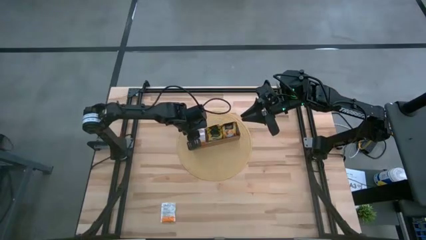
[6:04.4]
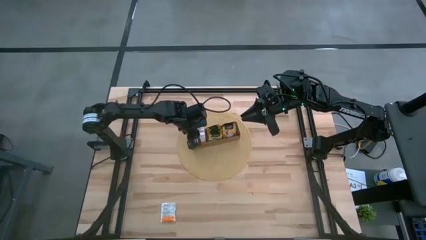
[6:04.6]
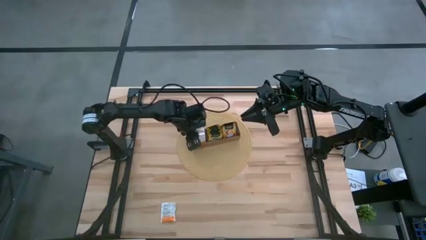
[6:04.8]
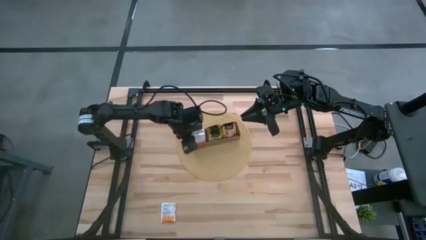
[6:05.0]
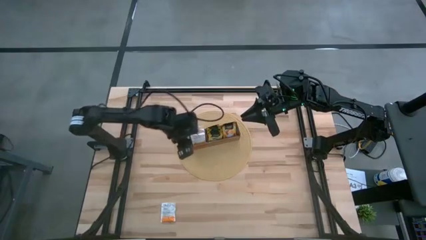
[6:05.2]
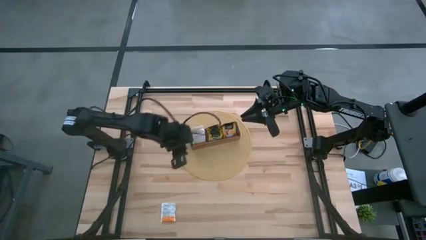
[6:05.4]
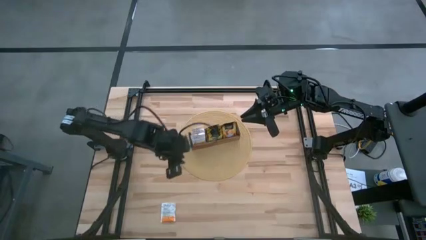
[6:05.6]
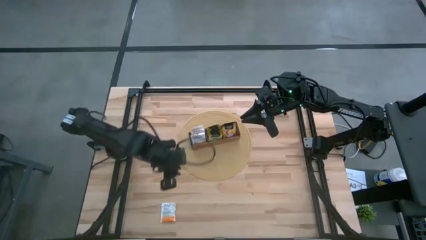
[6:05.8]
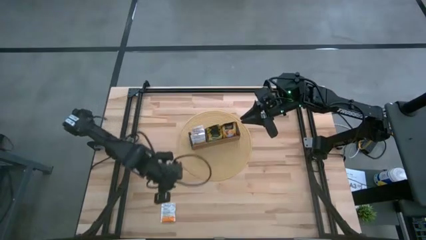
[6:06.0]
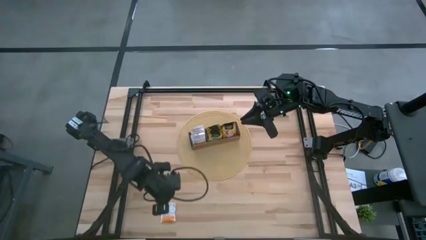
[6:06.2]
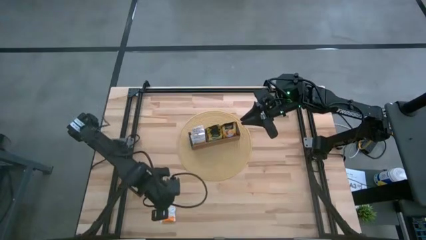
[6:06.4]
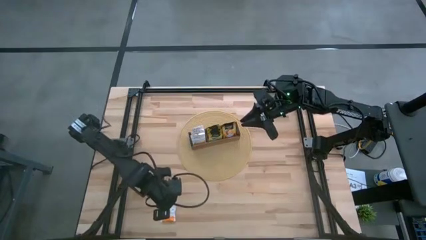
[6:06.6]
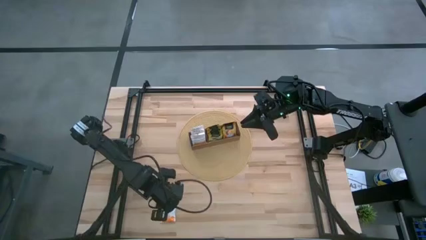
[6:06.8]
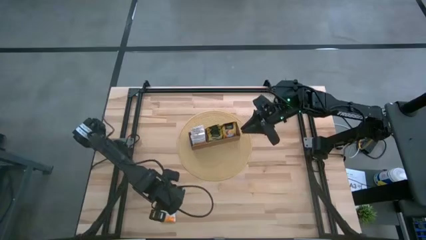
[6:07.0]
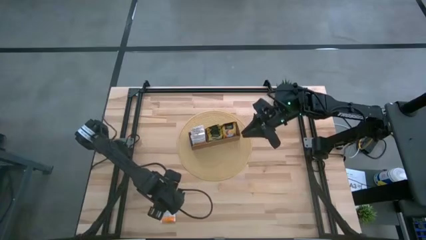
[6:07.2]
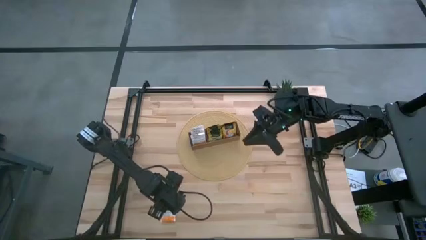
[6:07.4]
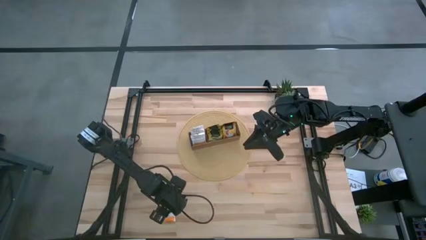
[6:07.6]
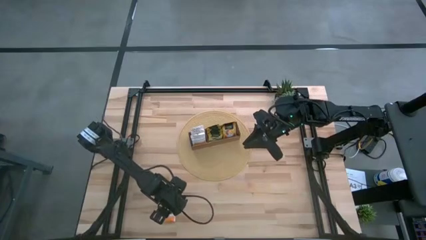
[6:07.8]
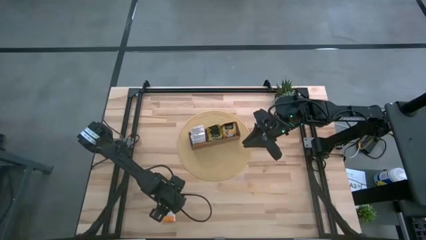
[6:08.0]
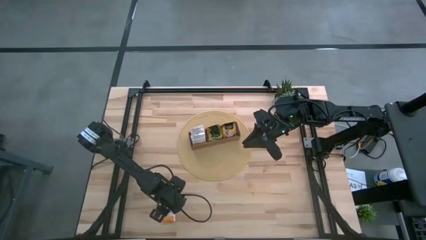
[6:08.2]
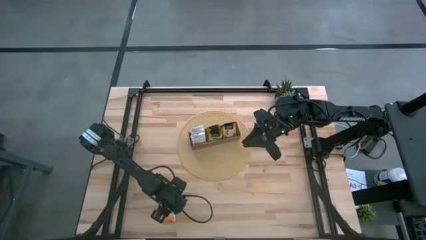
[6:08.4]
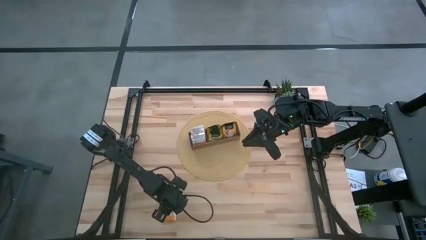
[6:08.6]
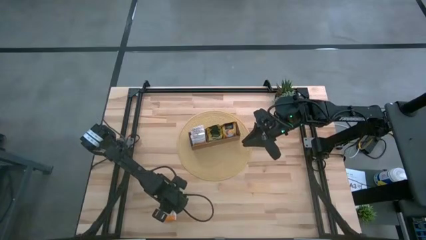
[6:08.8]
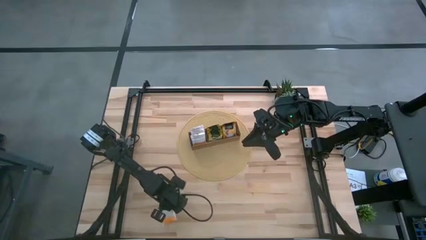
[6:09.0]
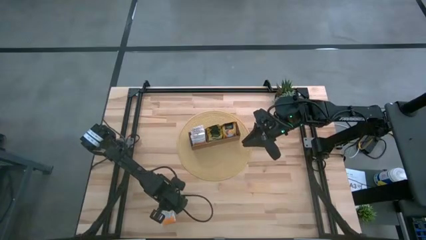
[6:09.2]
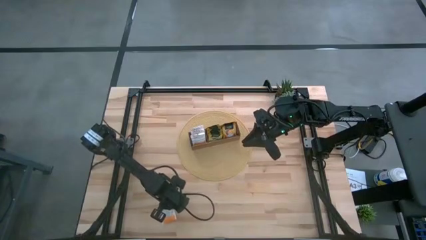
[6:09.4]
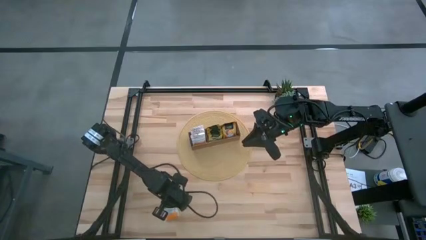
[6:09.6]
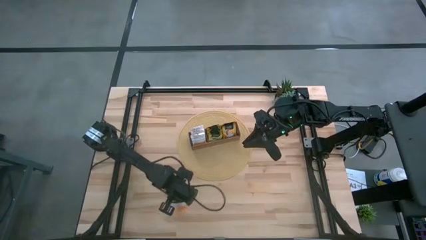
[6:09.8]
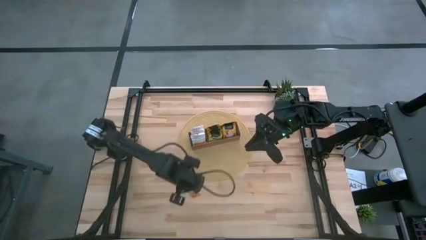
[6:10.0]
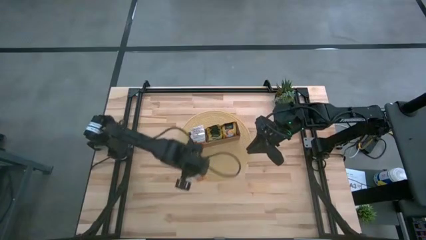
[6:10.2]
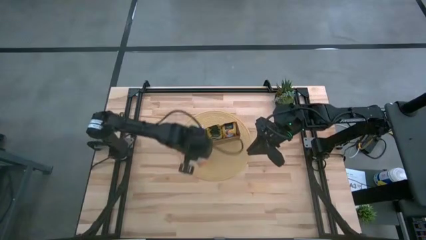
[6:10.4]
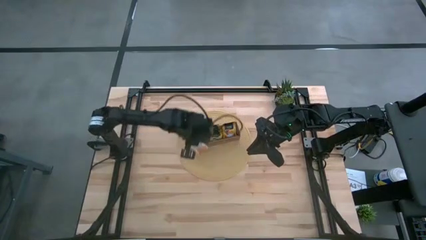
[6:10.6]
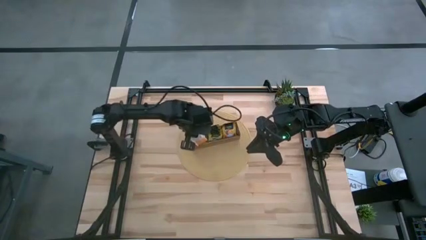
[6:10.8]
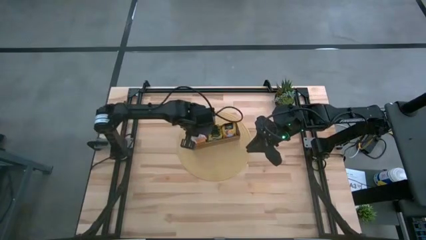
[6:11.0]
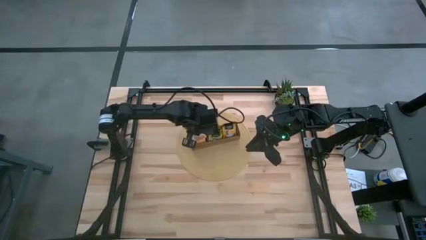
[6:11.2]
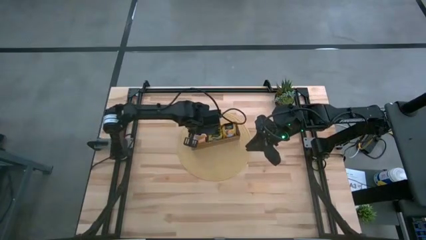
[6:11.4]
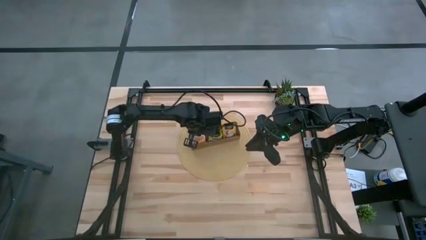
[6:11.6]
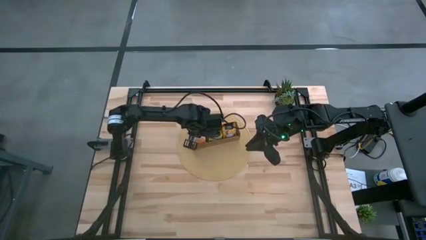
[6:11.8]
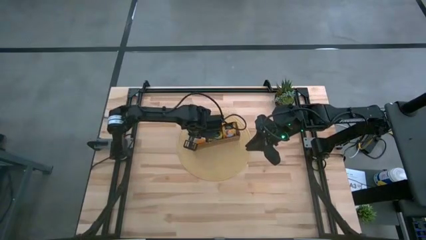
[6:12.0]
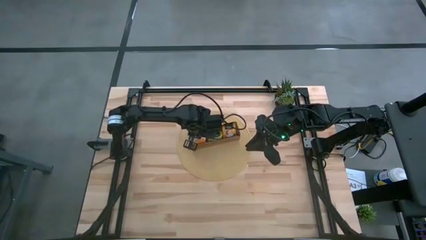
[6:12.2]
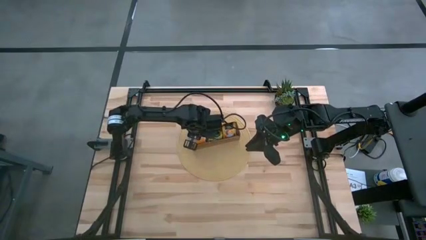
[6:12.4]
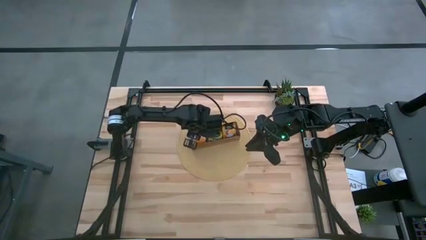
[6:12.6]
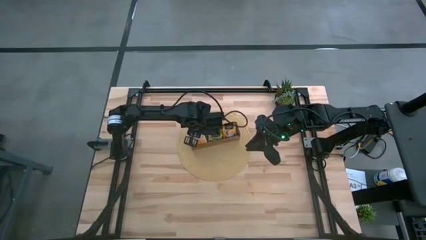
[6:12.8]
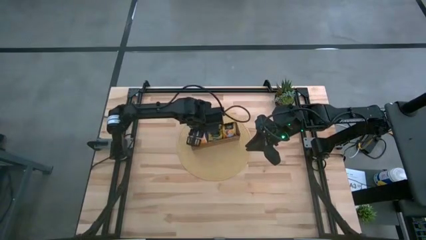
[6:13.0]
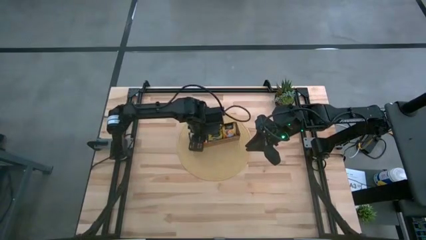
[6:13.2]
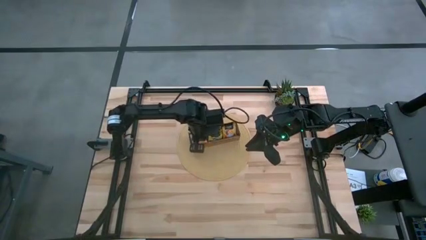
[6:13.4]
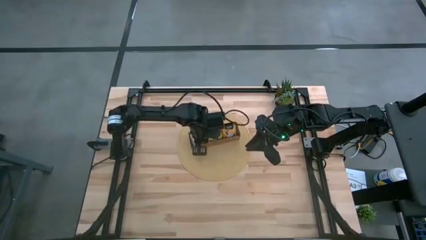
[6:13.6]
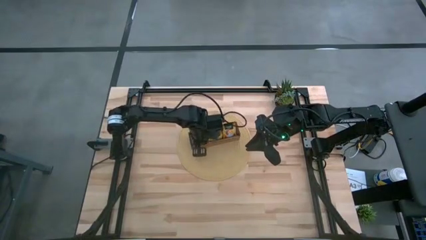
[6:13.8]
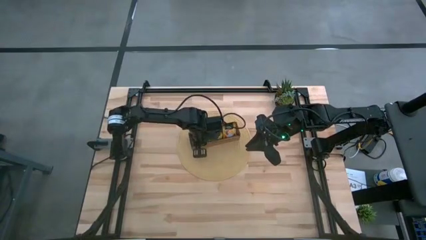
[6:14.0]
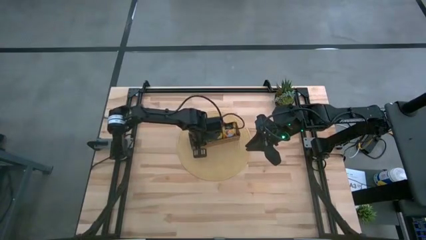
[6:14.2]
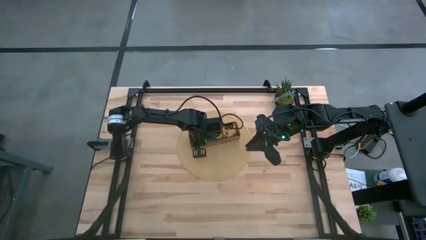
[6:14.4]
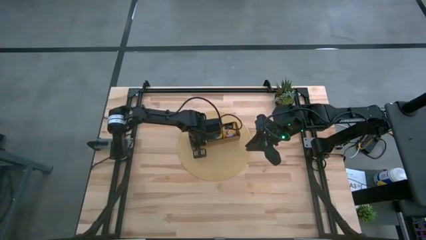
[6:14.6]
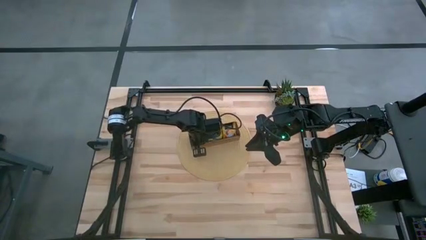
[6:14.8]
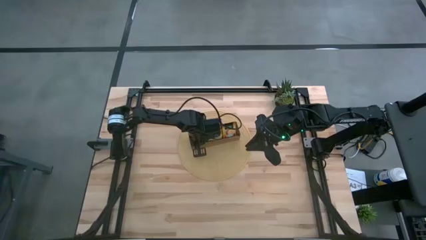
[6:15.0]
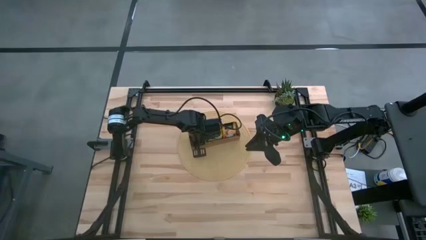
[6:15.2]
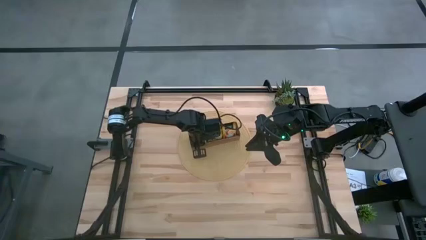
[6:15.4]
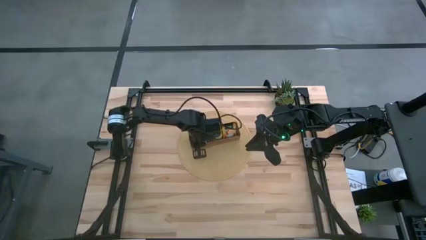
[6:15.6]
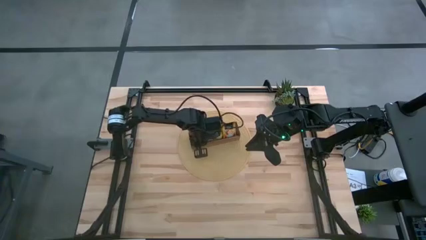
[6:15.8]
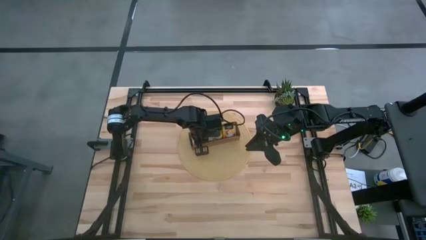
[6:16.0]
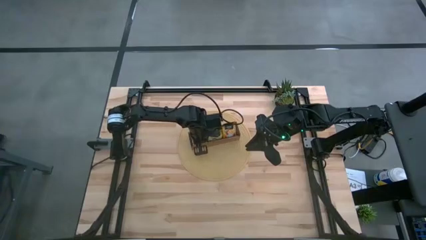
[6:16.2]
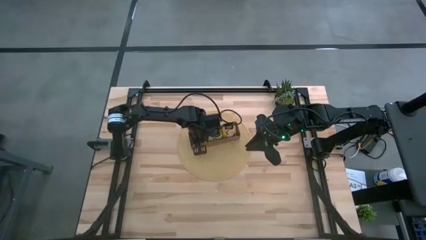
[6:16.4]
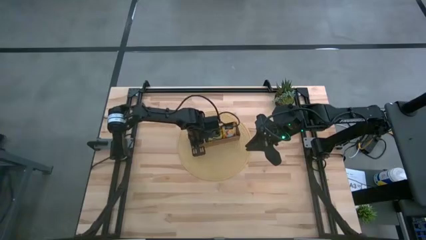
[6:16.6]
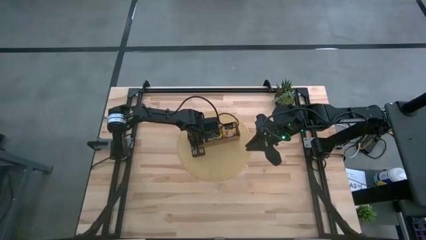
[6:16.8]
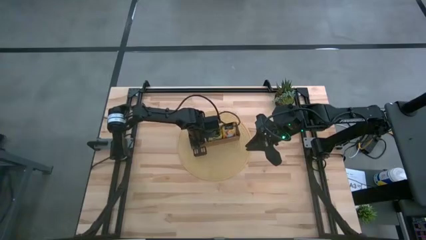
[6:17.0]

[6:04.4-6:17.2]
Task: Pick & Place Tea
Put the white tea bag into the left section of the wooden organizer

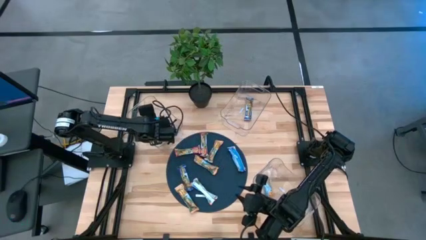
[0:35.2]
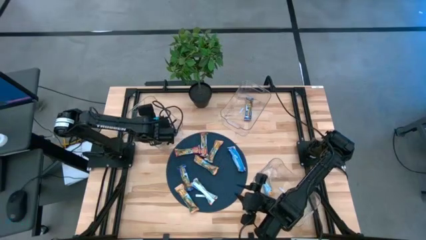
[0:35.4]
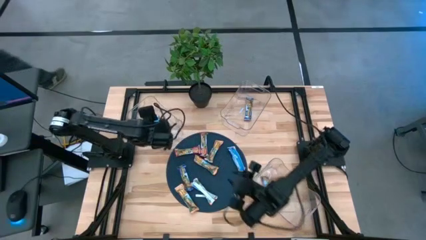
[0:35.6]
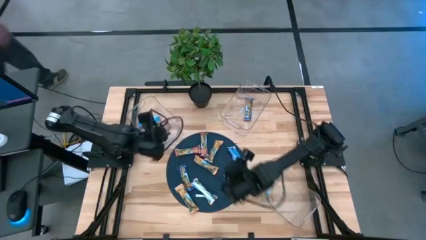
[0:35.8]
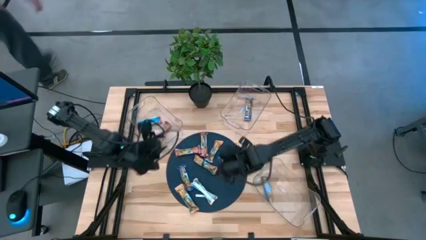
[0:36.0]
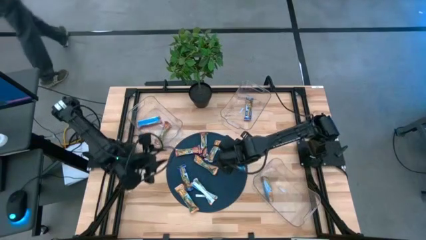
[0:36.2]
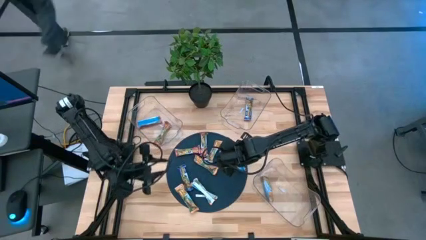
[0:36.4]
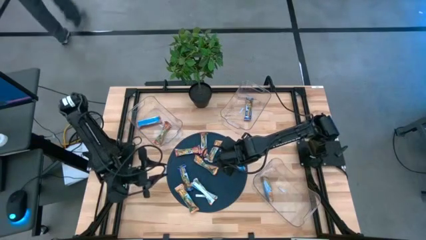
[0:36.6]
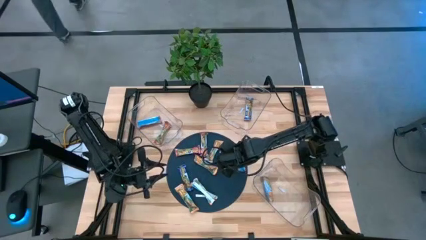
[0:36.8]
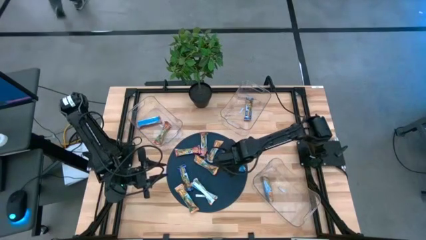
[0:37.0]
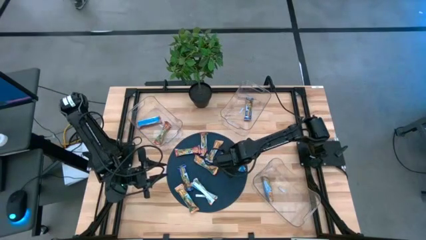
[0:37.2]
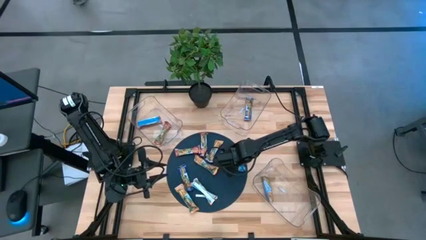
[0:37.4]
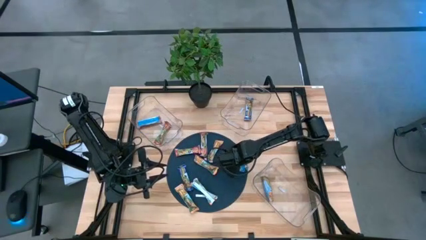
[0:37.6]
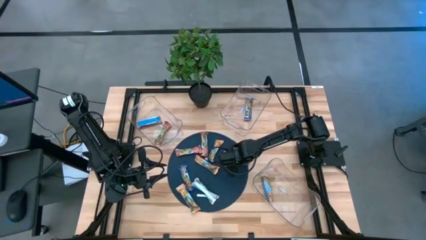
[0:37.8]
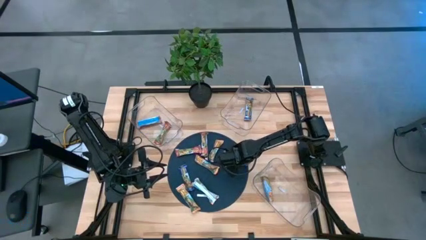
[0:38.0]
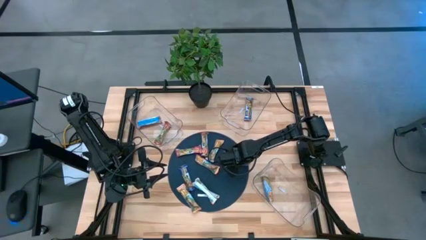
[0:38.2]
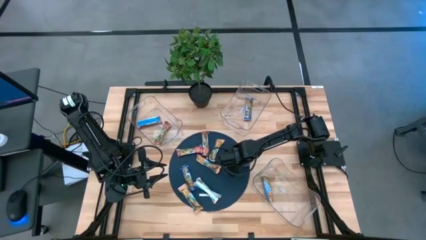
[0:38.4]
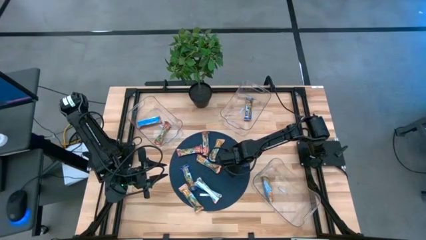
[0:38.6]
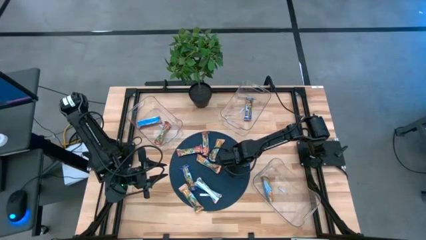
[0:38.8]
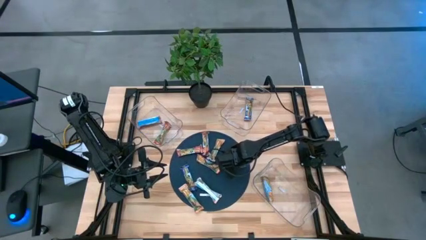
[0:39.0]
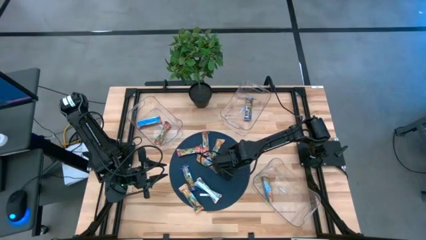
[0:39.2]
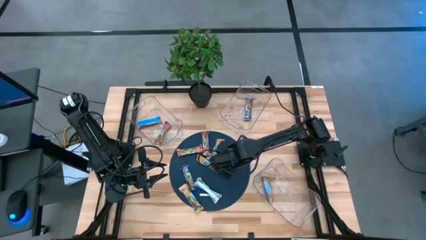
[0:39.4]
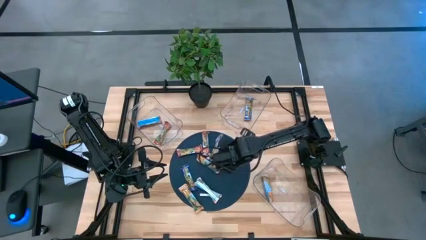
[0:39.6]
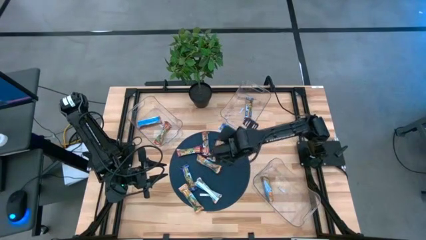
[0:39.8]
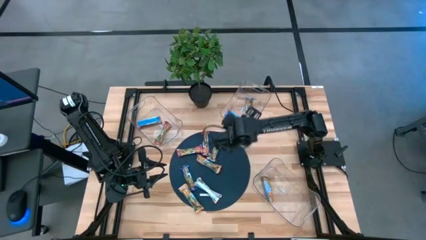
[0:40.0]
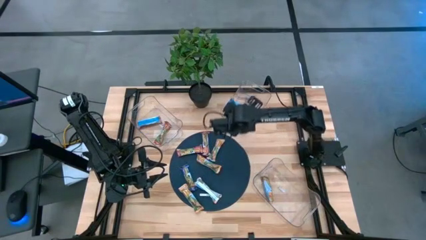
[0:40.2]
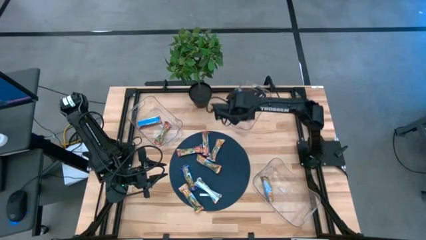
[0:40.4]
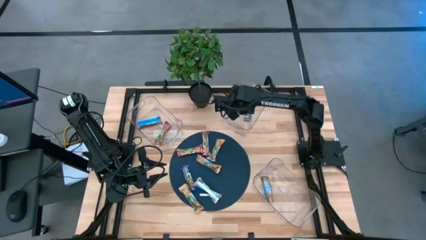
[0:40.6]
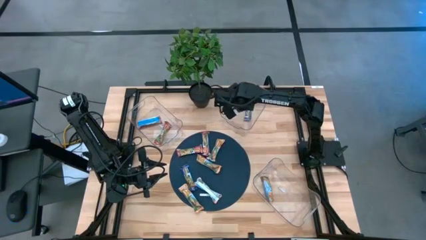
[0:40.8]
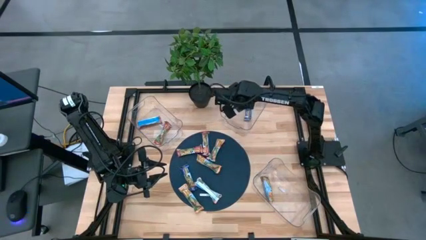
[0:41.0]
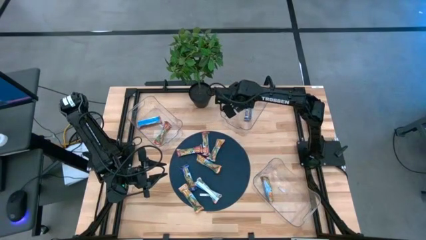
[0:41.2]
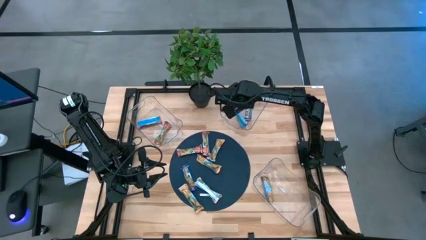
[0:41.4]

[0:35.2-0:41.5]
Task: Pick and place Granola Bars by type
Put the blue granola bar into the top right transparent bin
